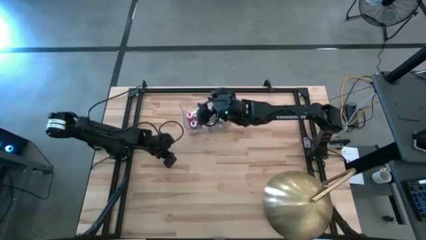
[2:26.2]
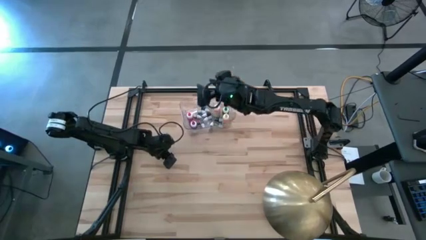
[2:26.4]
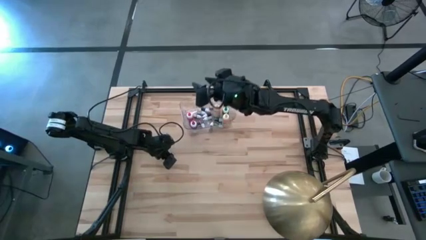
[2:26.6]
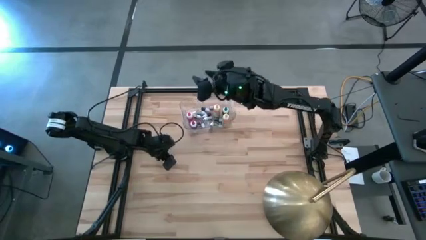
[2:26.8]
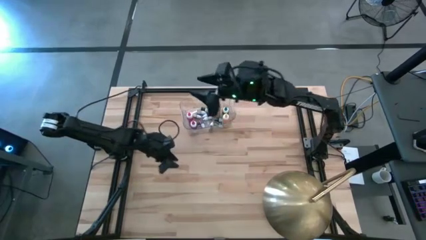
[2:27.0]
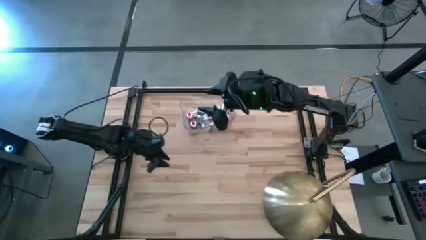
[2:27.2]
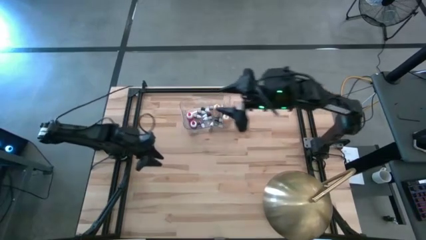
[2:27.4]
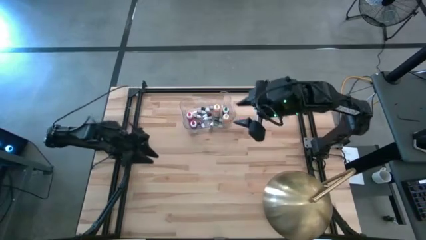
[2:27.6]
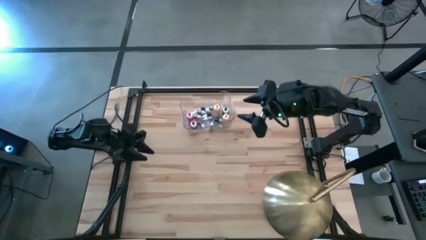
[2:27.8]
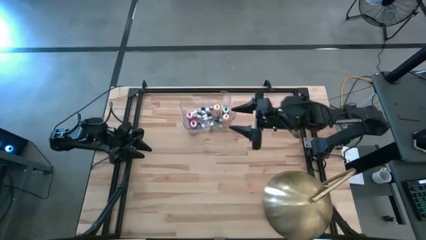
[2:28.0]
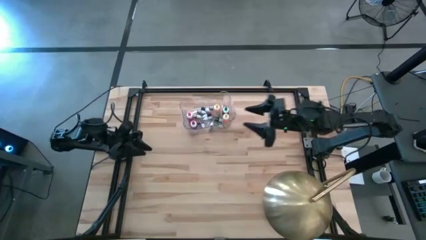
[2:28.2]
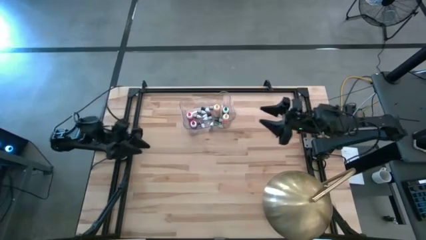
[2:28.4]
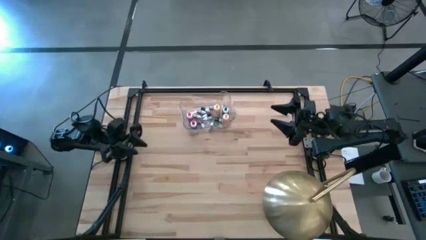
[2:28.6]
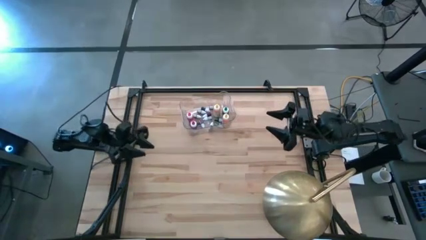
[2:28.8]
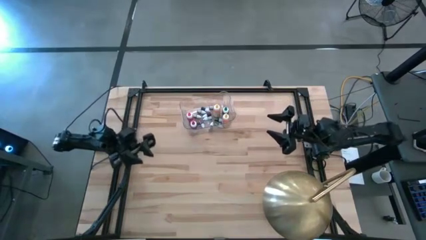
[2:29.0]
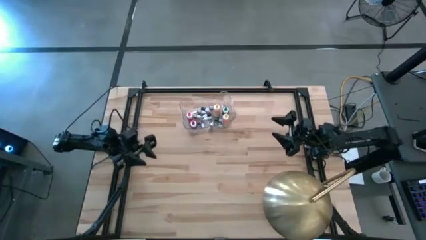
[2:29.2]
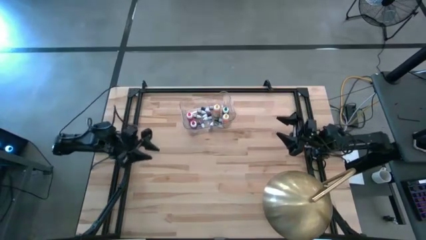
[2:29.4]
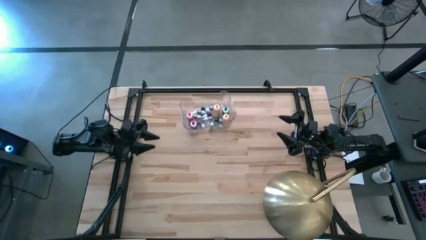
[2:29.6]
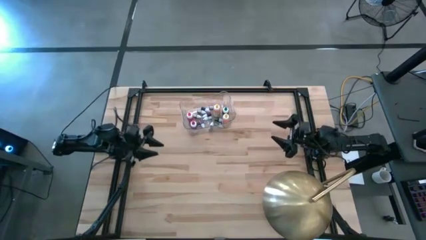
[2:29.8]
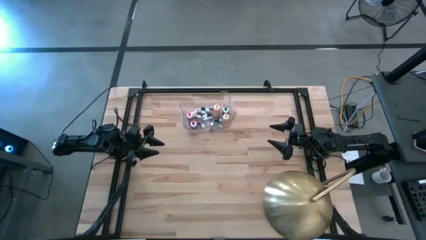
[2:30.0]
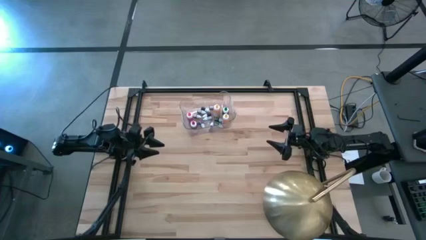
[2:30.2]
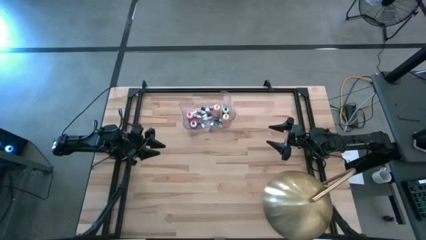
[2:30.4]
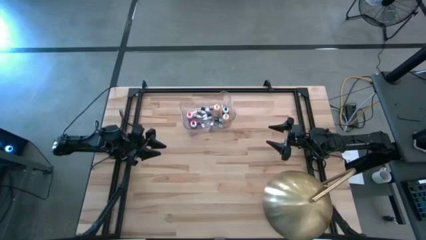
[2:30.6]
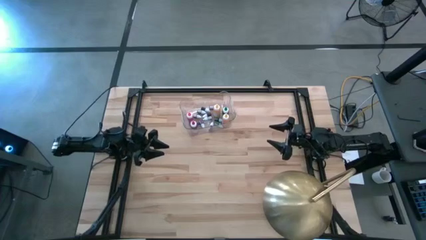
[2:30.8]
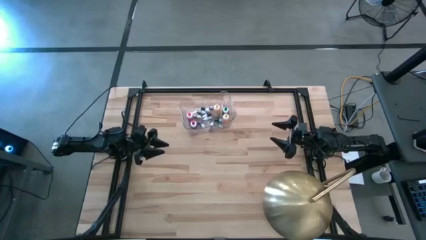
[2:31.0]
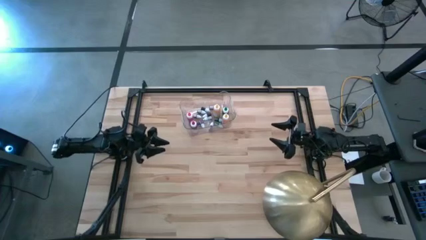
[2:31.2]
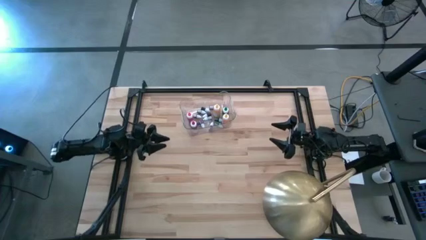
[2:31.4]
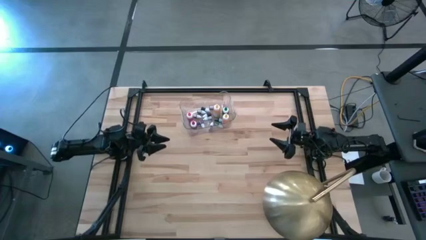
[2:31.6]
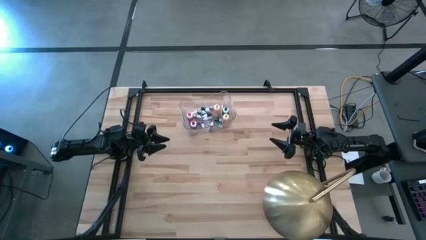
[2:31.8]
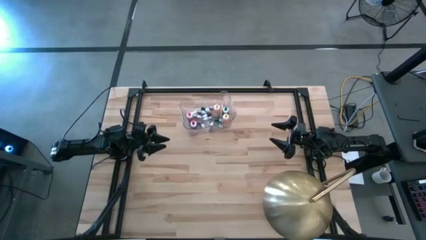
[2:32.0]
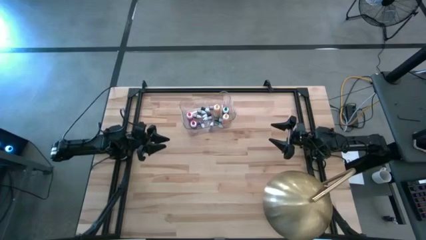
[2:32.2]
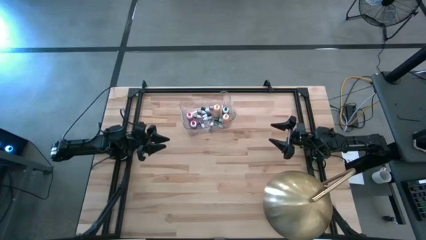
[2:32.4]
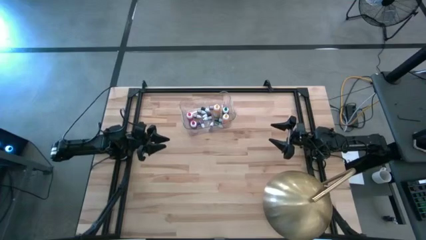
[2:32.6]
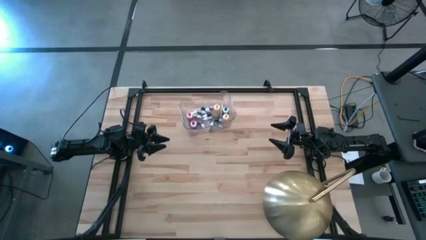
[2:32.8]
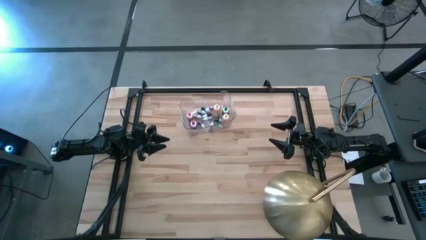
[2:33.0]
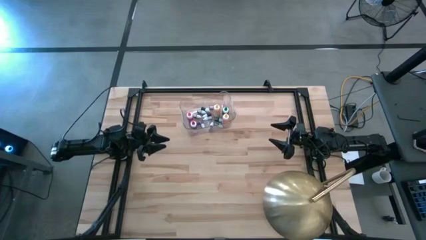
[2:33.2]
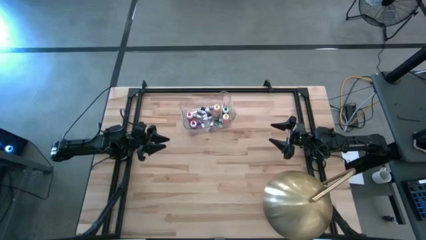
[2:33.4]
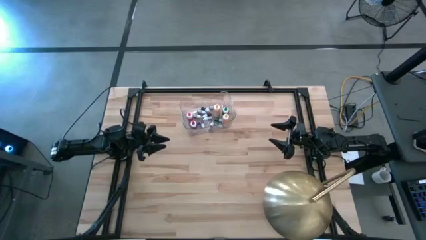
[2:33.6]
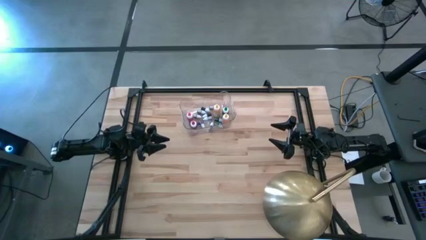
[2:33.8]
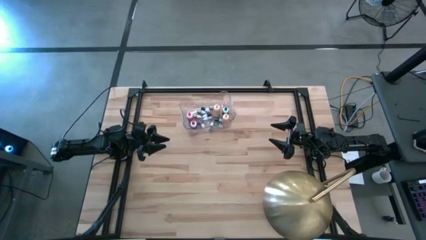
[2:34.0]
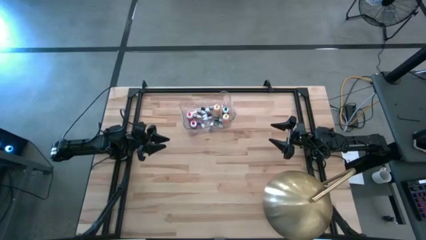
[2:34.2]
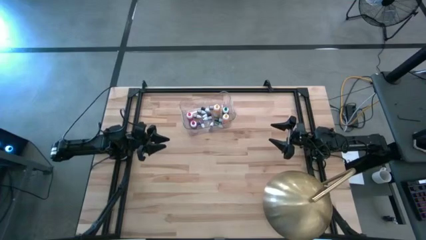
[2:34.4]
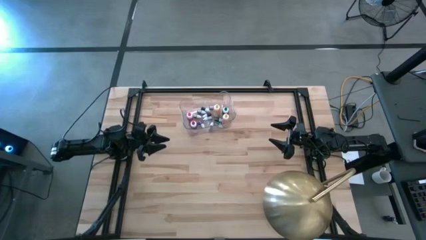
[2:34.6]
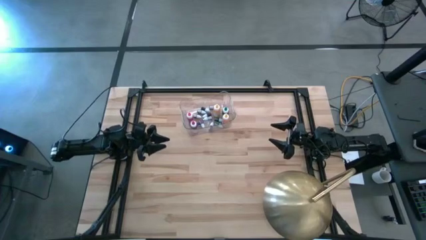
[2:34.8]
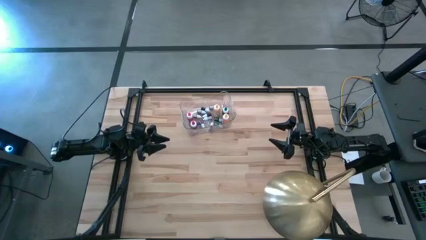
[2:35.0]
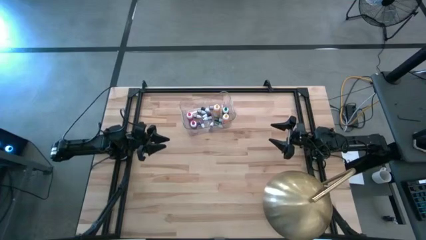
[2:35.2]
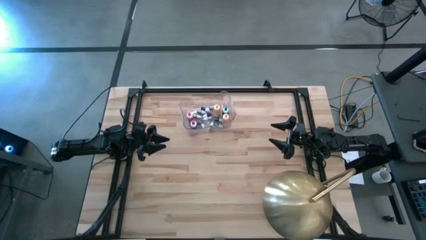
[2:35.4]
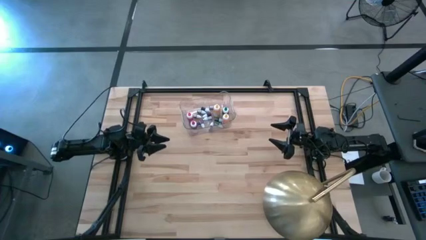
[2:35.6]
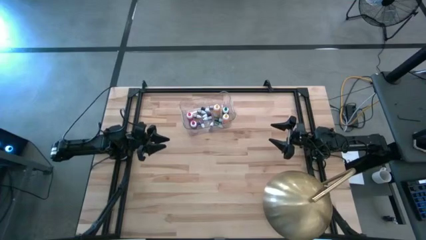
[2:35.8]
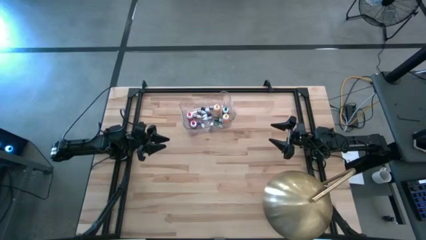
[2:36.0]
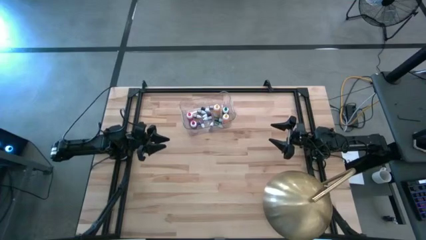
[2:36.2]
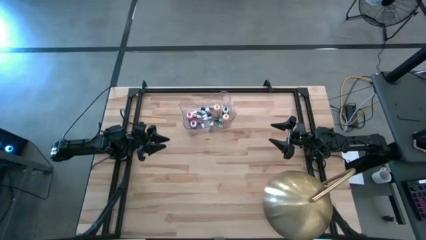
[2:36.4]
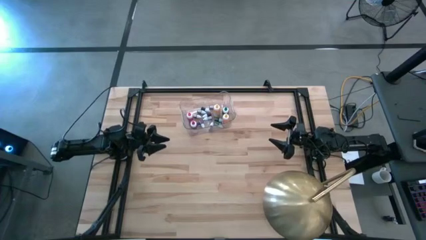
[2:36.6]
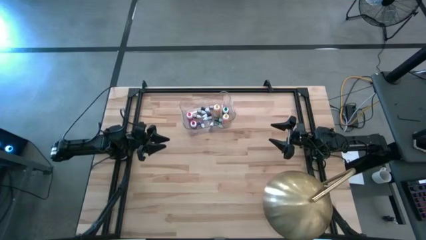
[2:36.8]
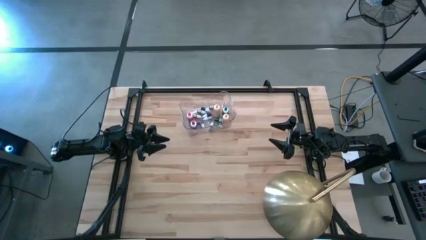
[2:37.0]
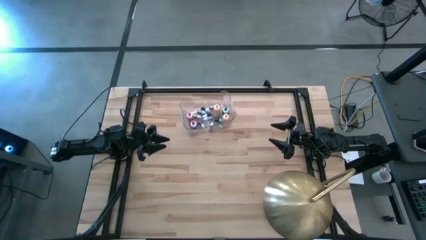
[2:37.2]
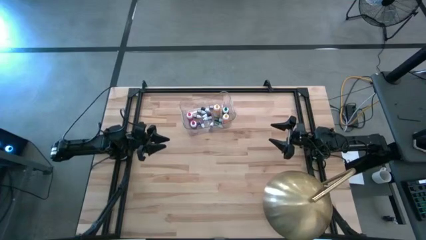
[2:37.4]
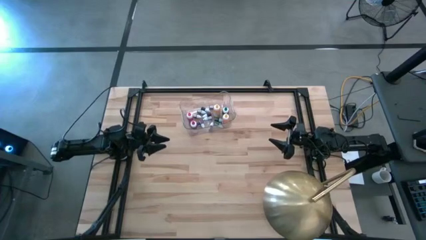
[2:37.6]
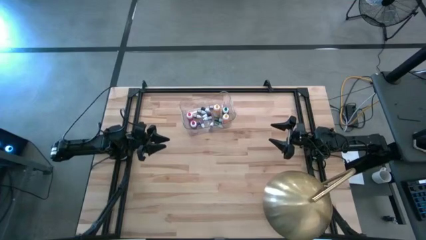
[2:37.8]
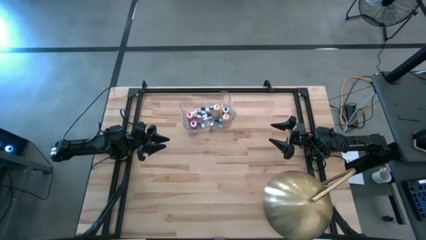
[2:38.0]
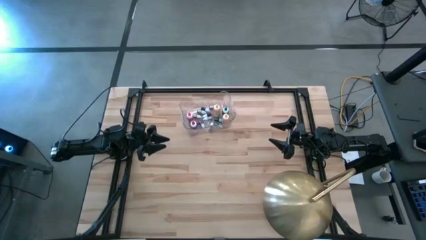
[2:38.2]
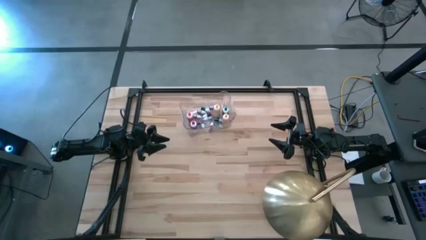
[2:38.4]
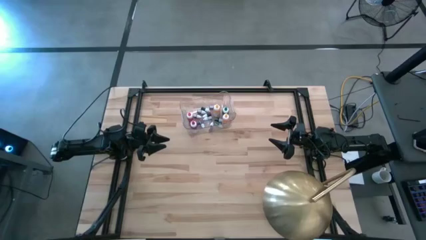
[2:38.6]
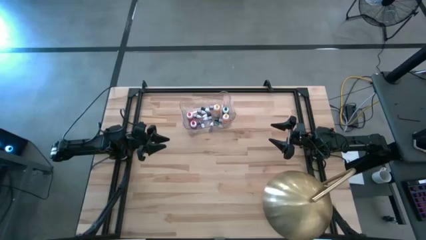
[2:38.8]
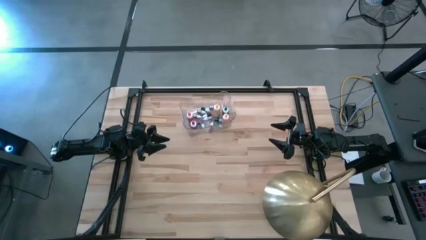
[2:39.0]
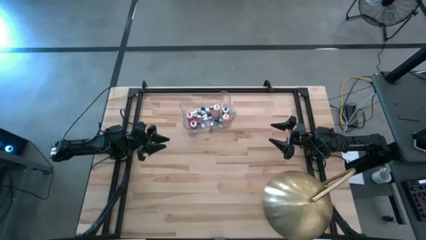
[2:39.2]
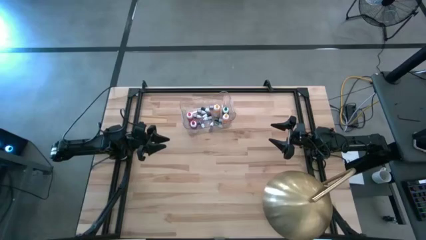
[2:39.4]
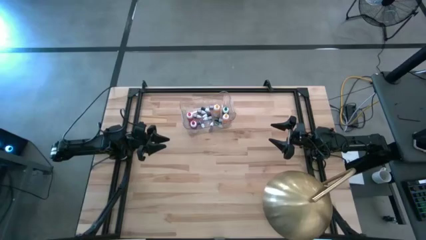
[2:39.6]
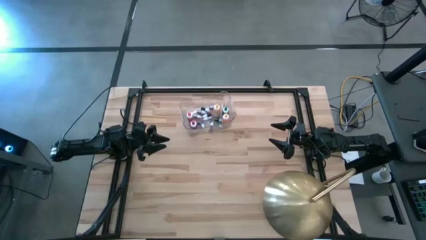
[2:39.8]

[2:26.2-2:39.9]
Task: Pick & Place food coloring
Return to Home Position
